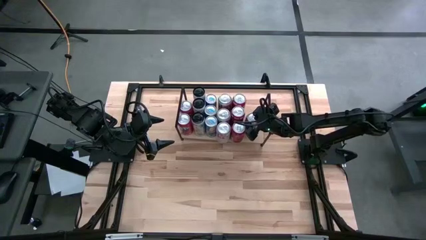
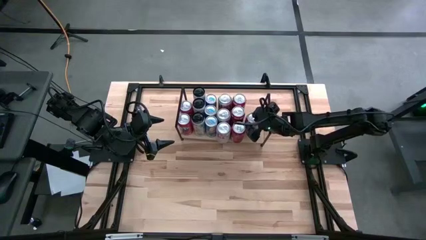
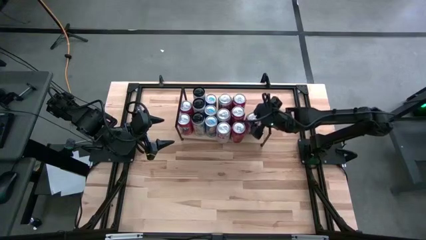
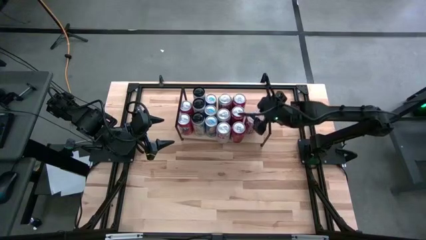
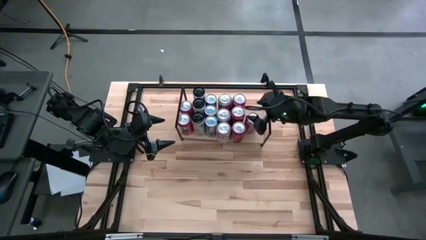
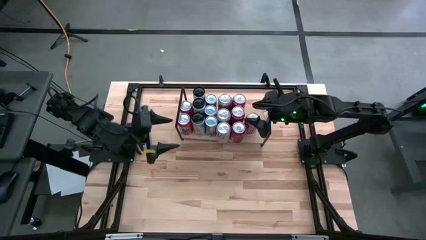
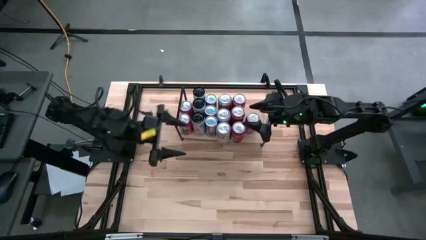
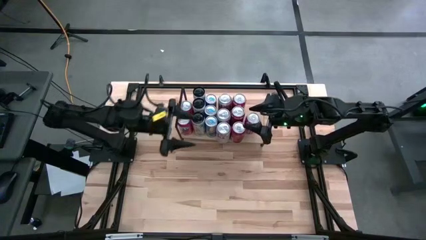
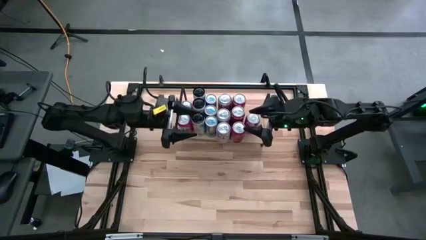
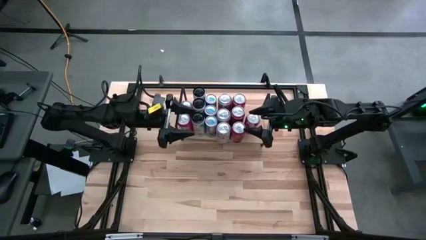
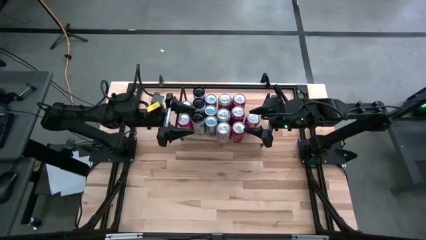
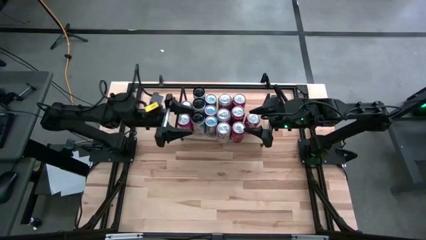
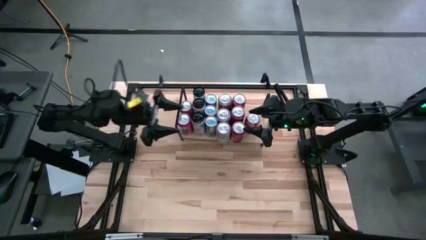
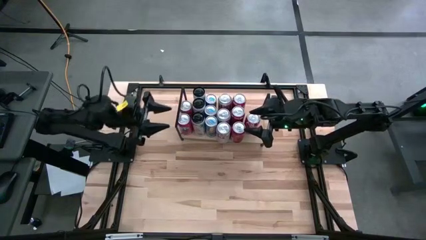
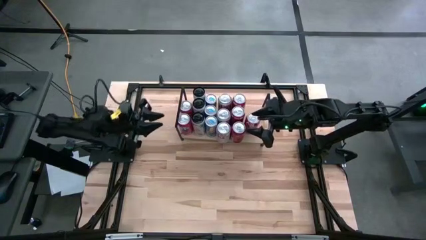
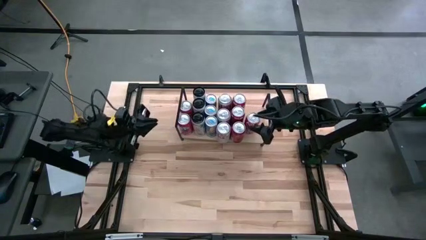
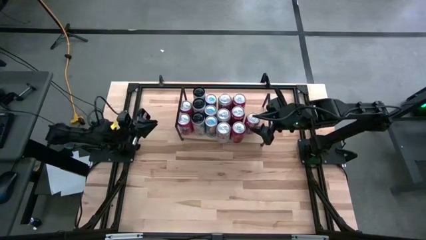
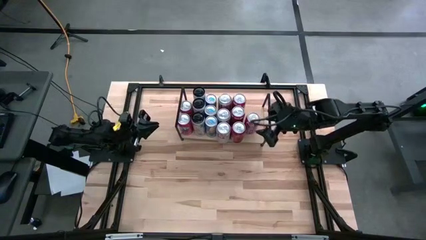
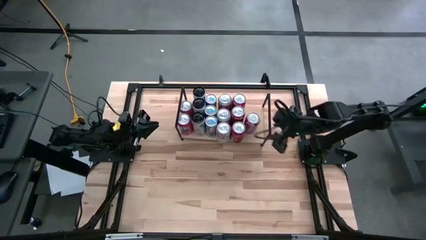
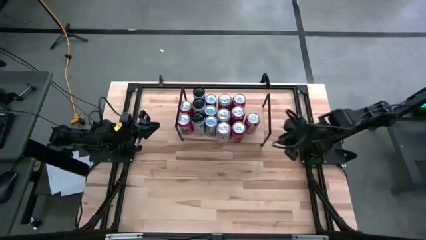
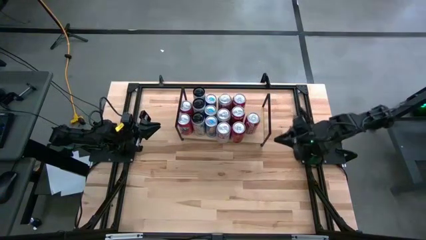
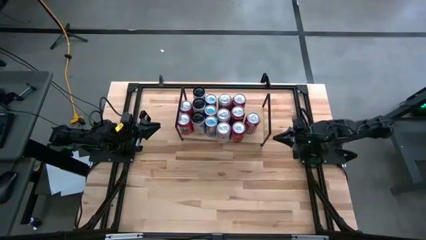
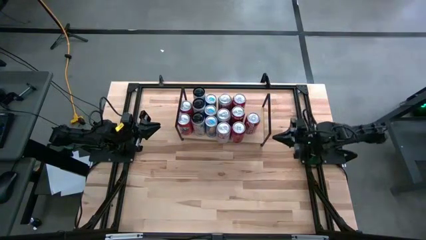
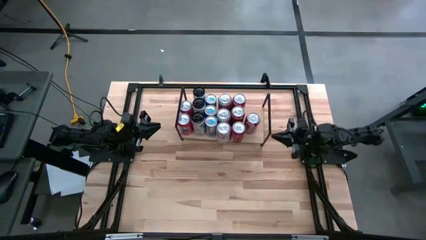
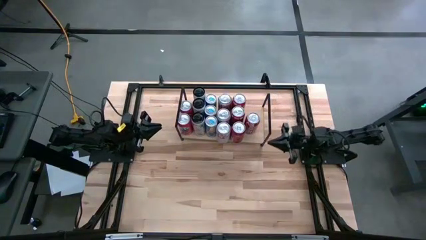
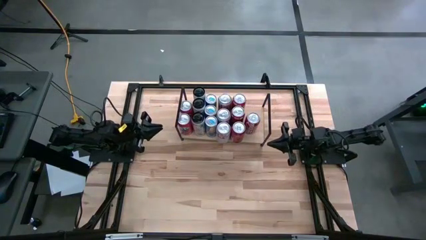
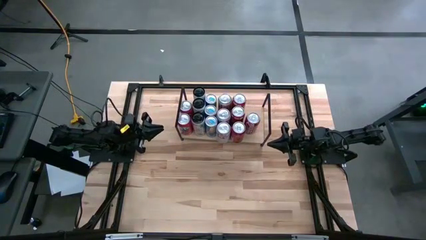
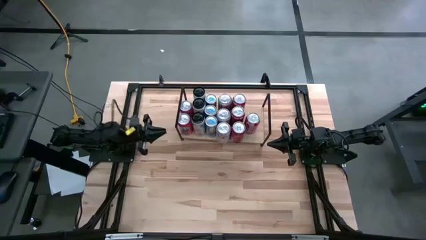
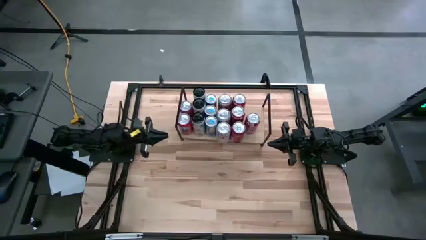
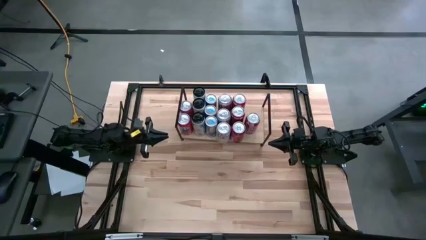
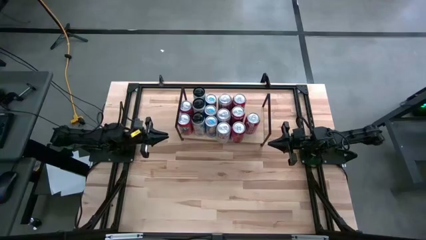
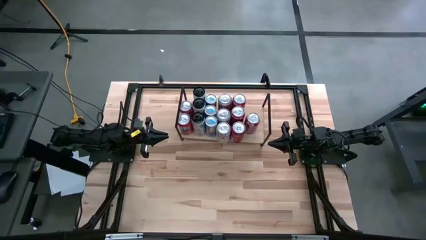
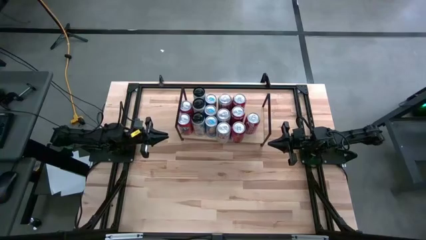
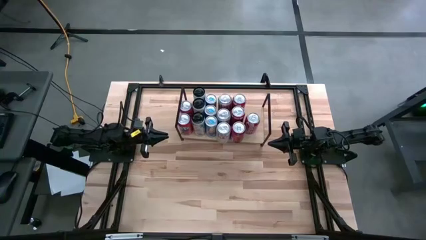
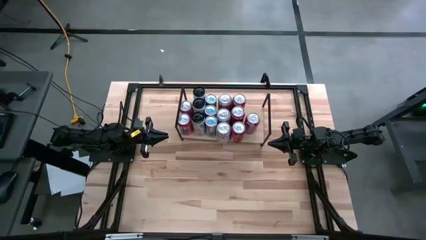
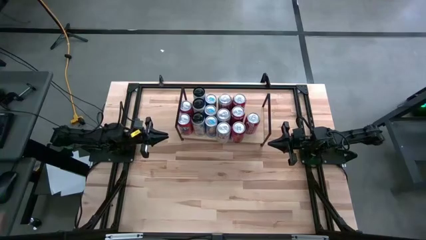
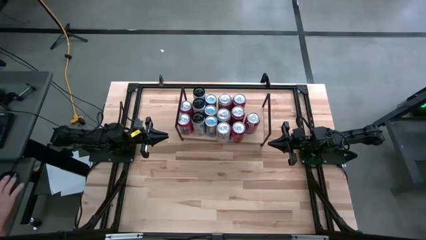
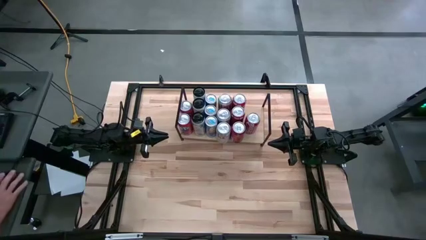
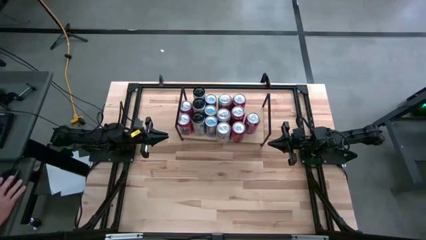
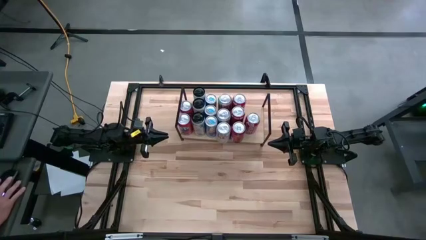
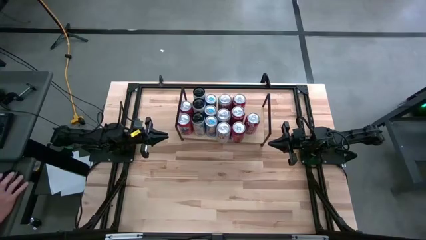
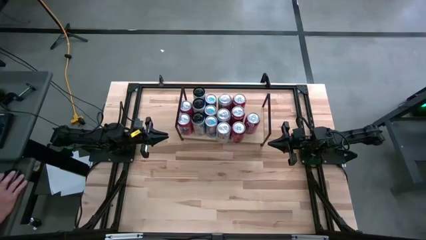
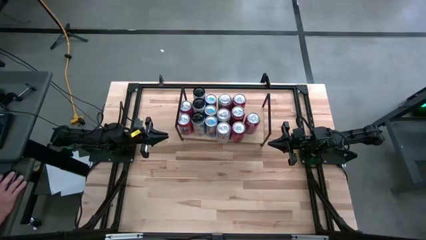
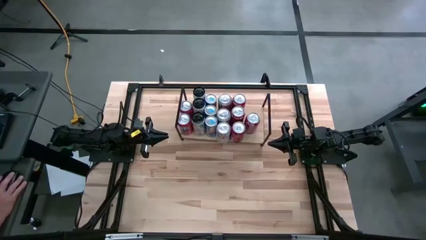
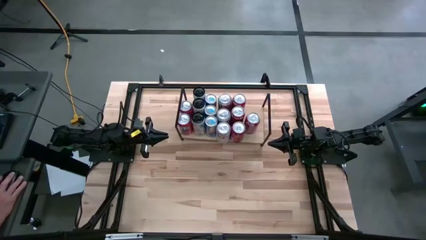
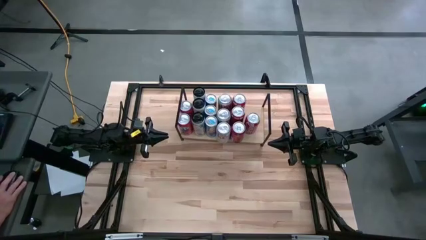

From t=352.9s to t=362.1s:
Task: Place canned beverage on shelf
Return to Home Position

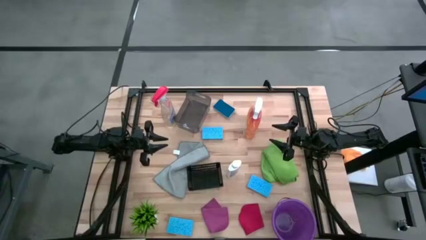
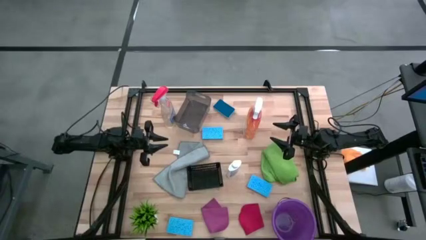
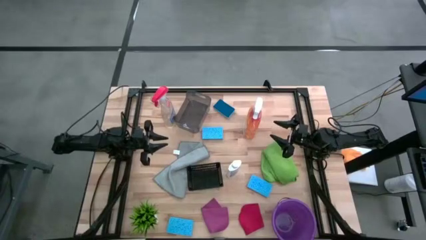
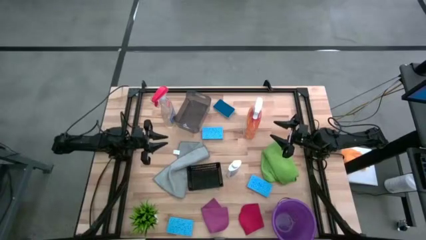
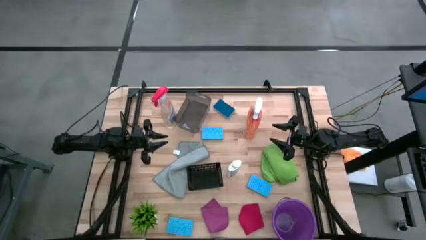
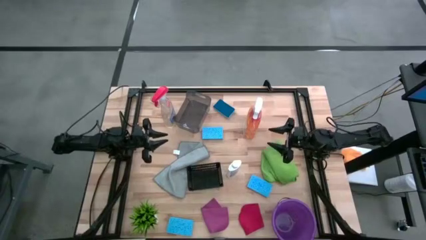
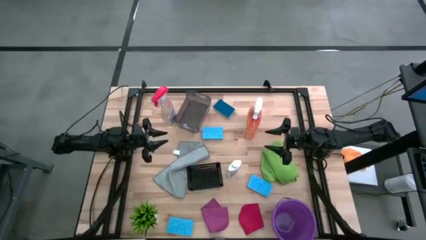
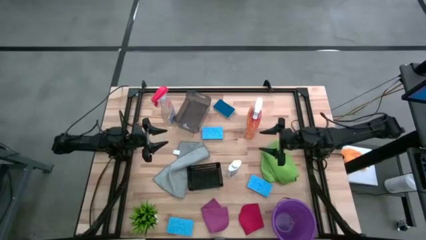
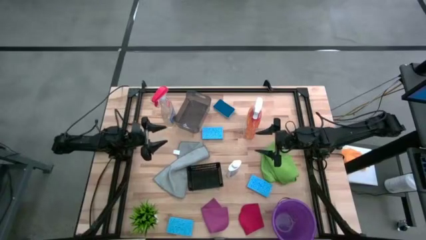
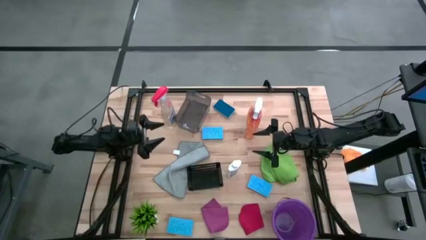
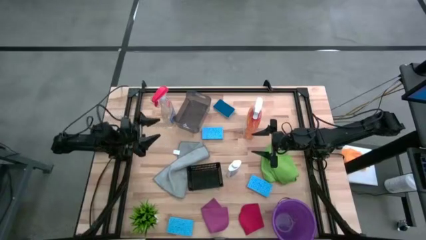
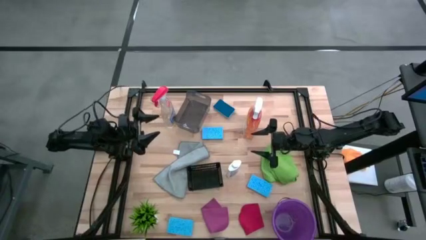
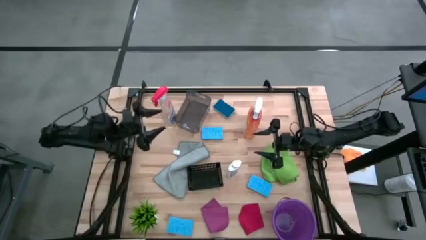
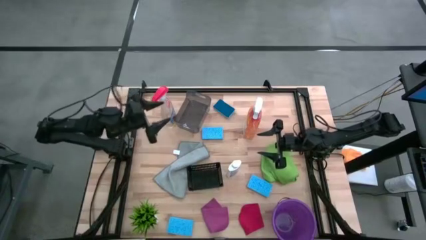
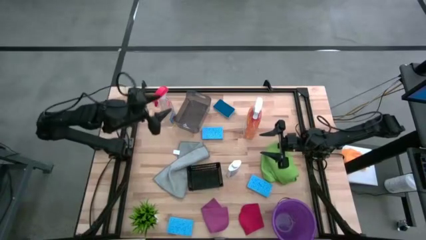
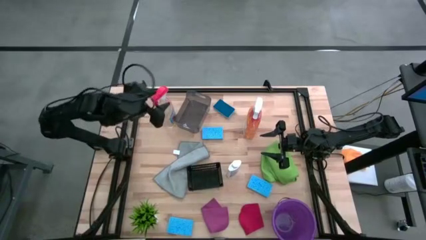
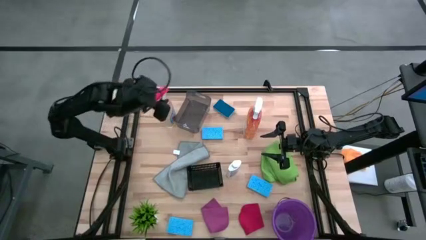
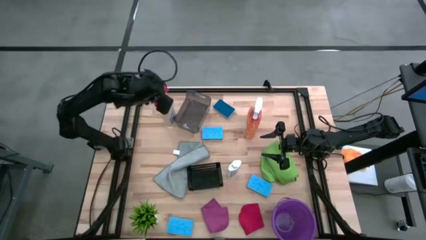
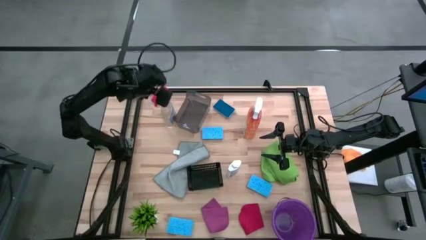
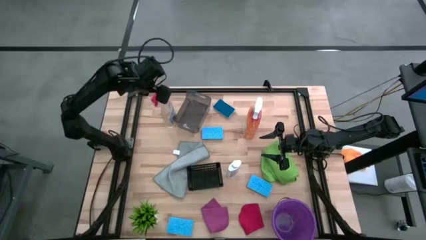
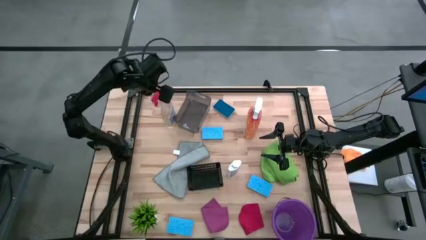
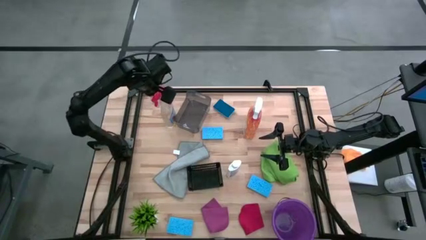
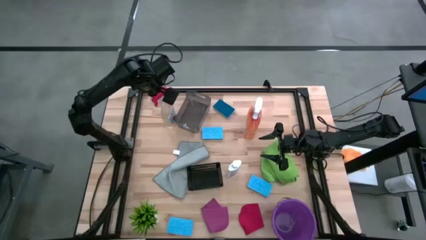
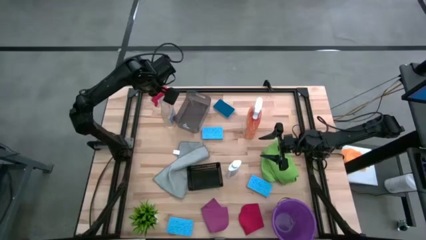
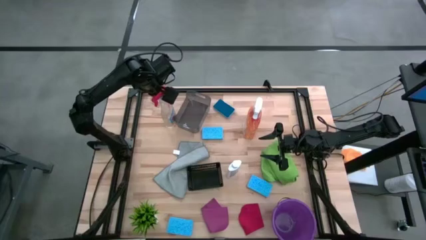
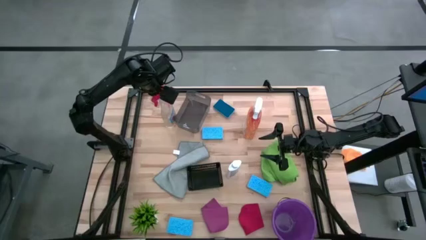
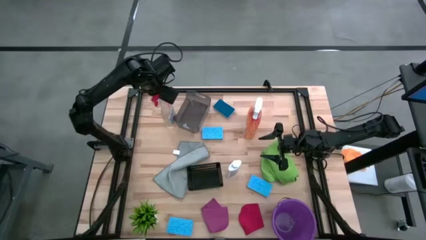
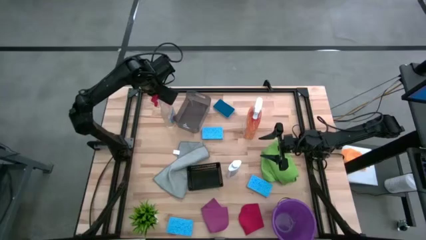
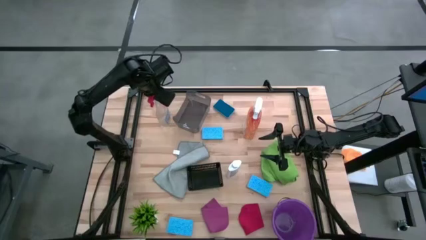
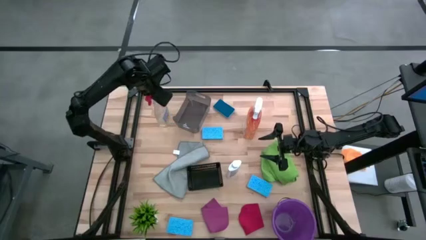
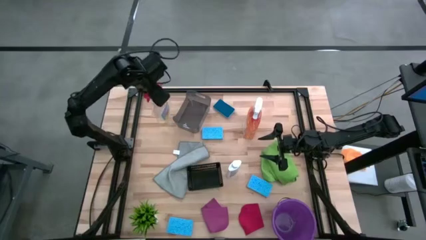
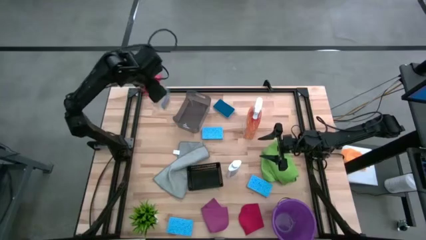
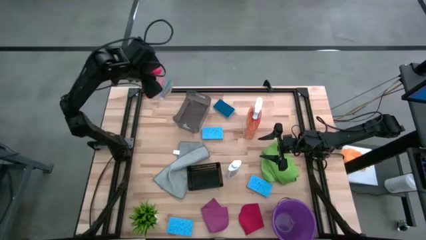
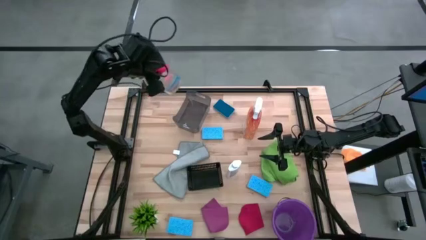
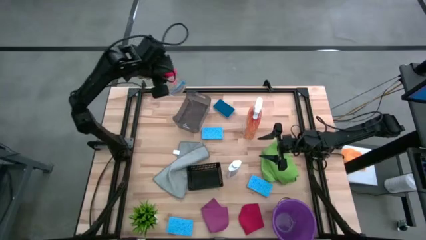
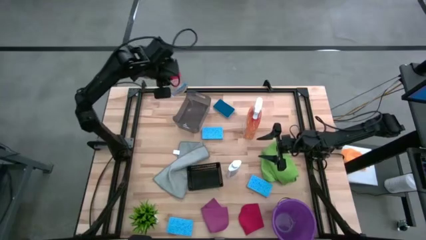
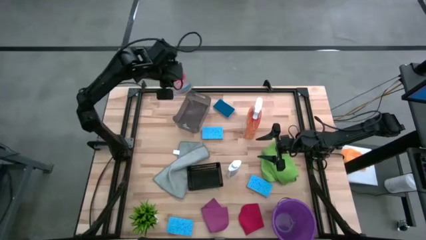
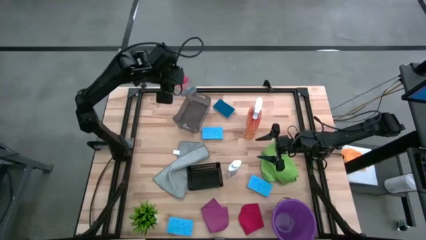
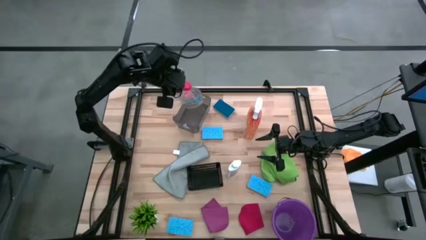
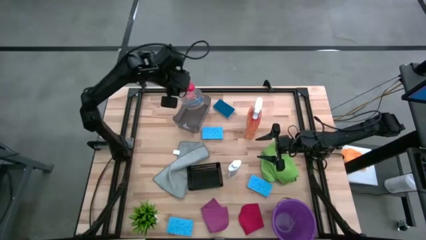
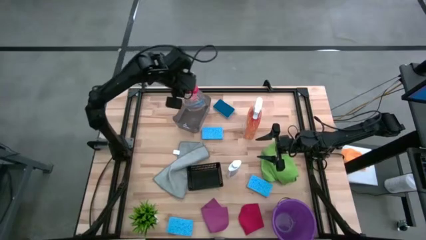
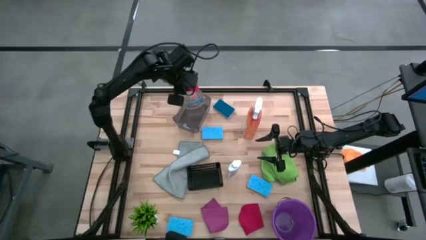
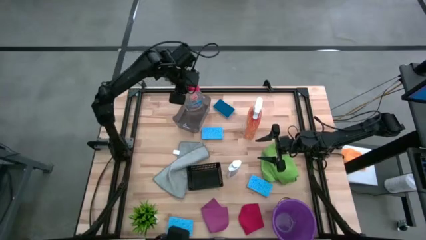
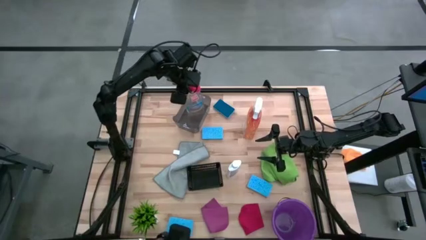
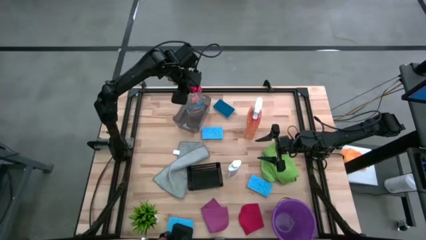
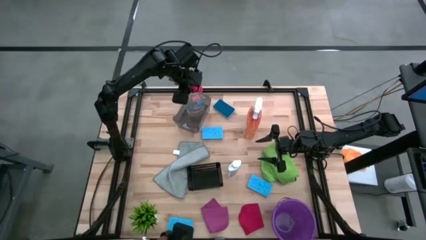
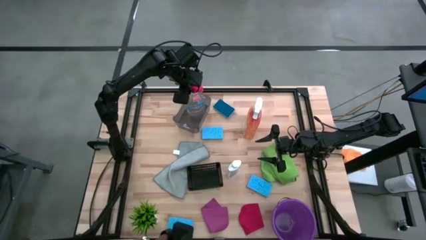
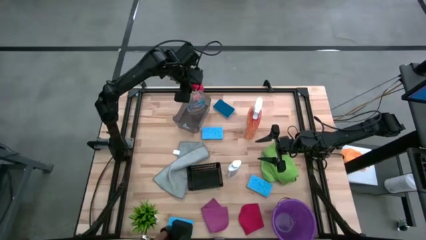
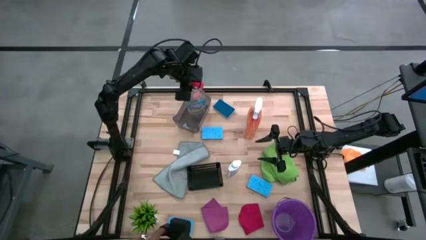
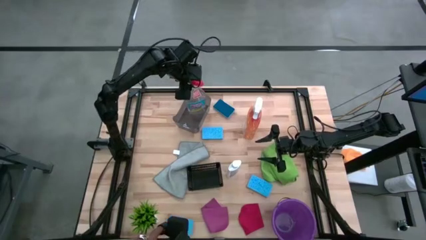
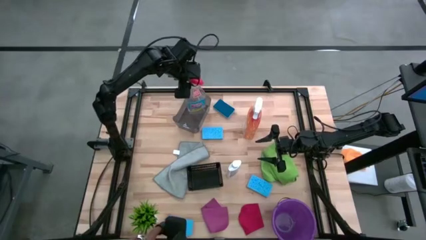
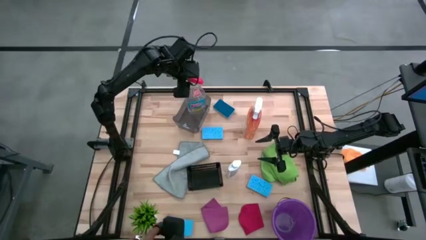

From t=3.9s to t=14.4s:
Task: Pick & Place Kitchen Items
Put the transparent spray bottle into the gray bin
